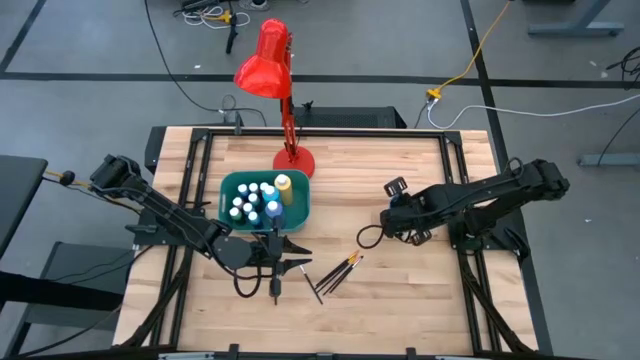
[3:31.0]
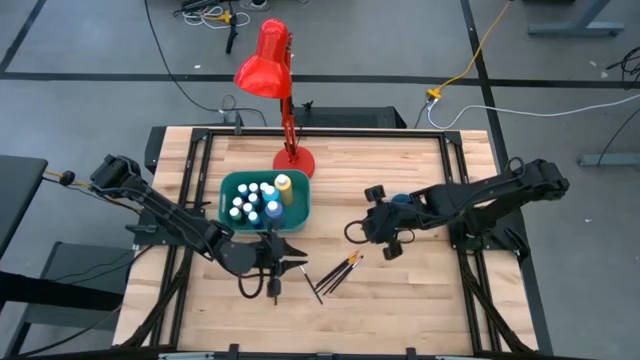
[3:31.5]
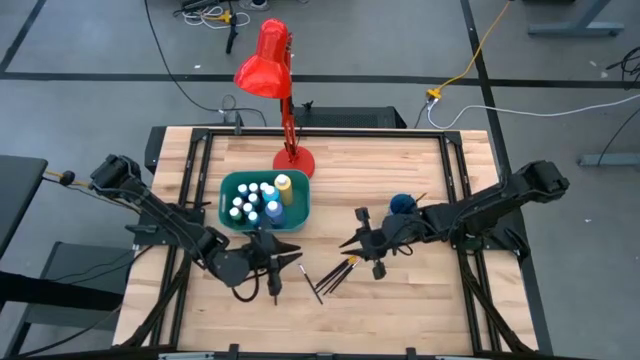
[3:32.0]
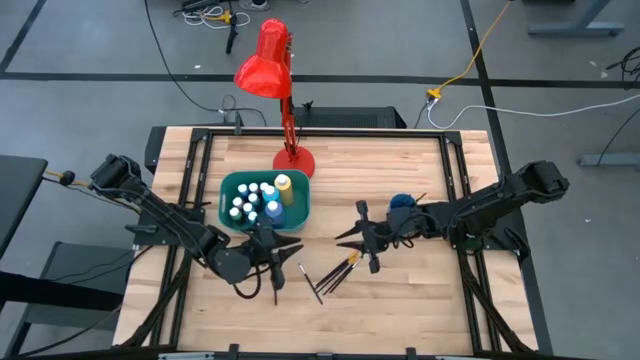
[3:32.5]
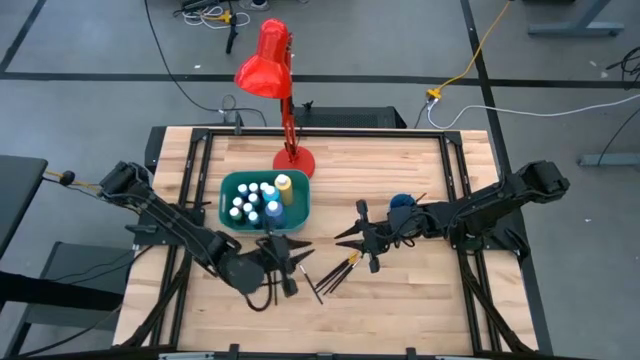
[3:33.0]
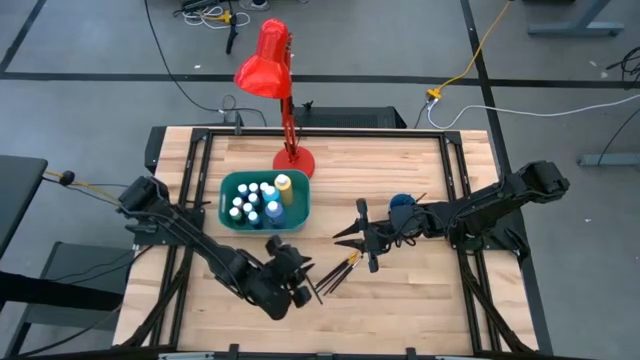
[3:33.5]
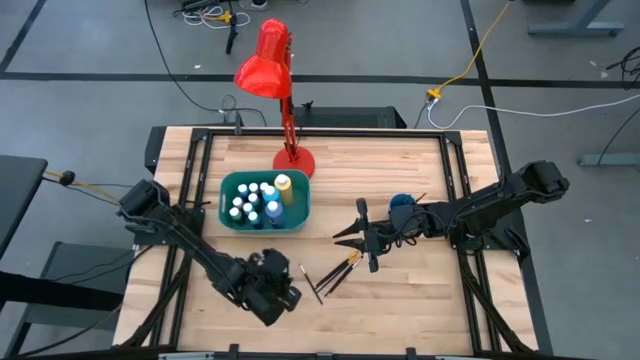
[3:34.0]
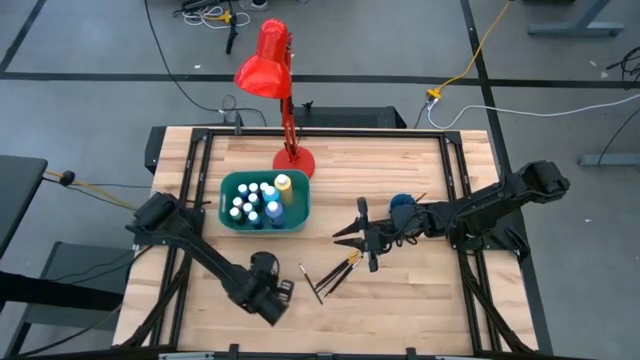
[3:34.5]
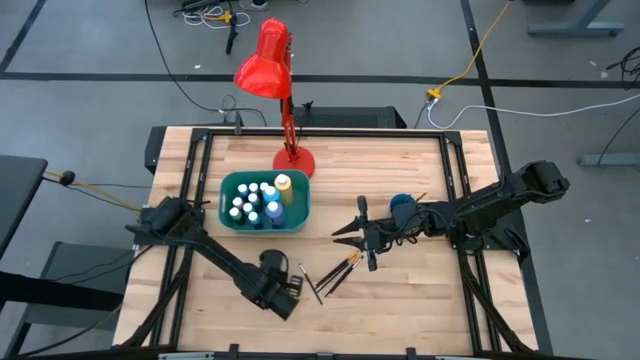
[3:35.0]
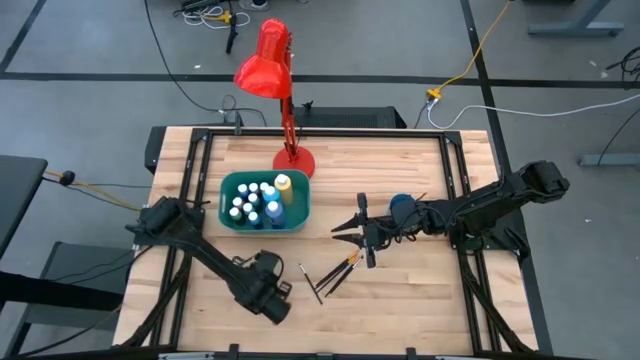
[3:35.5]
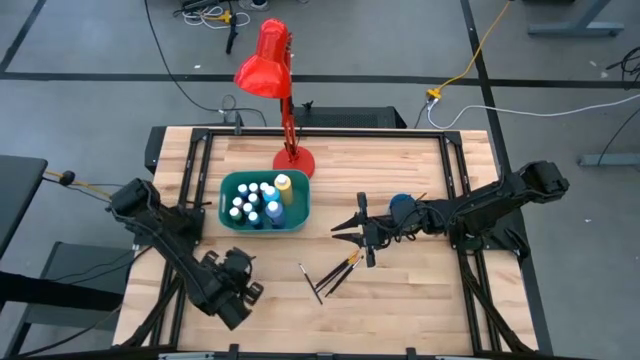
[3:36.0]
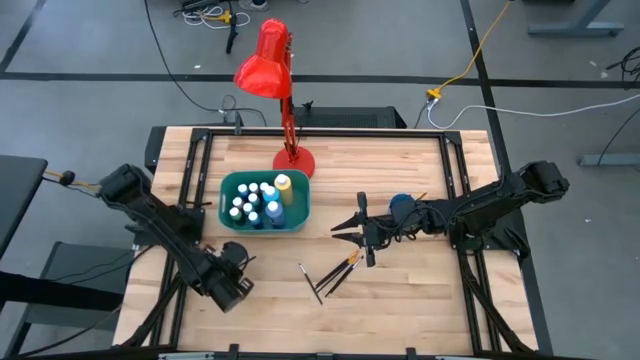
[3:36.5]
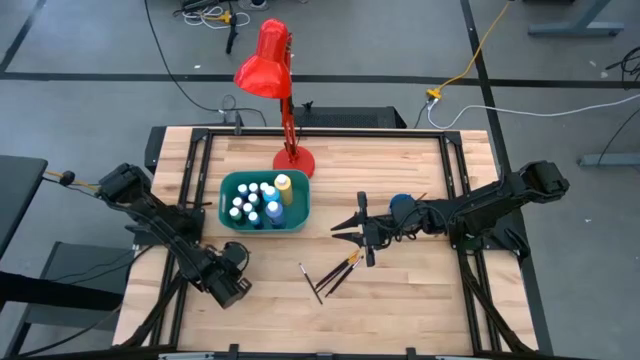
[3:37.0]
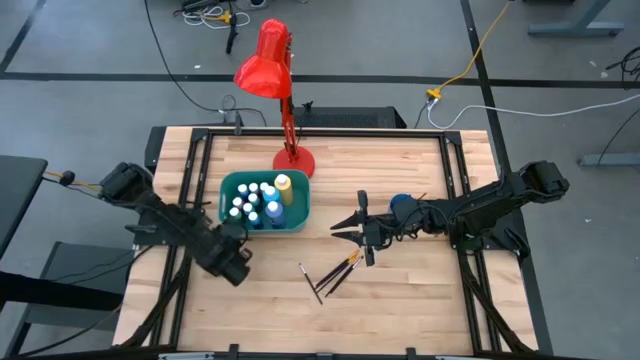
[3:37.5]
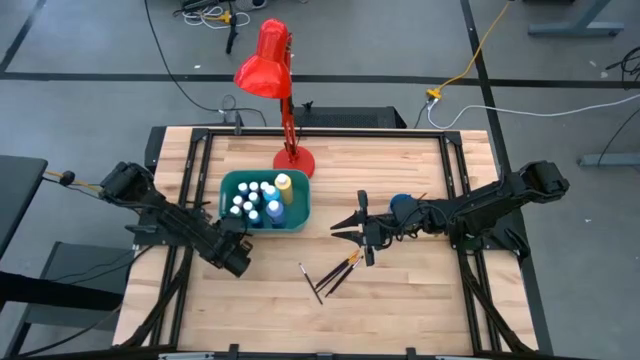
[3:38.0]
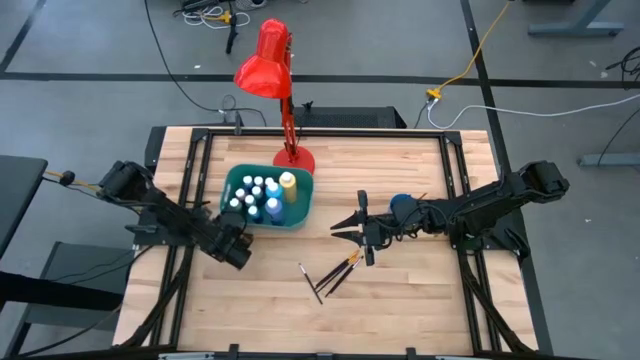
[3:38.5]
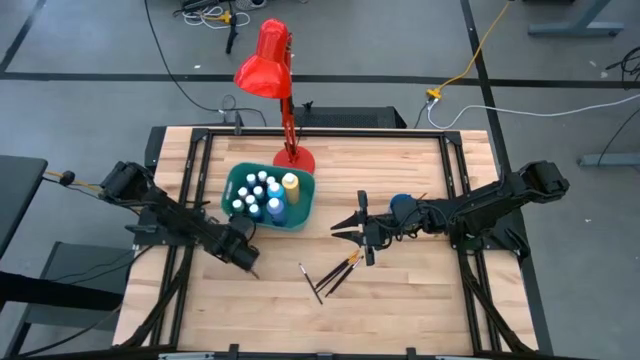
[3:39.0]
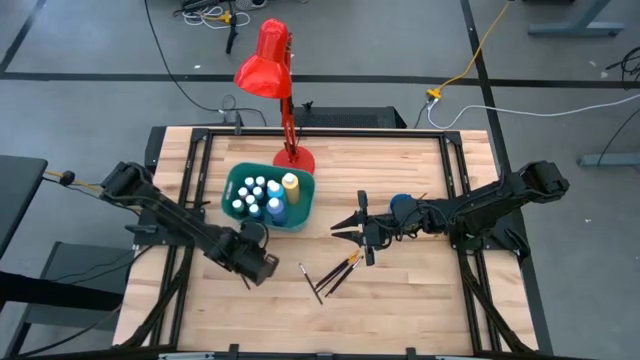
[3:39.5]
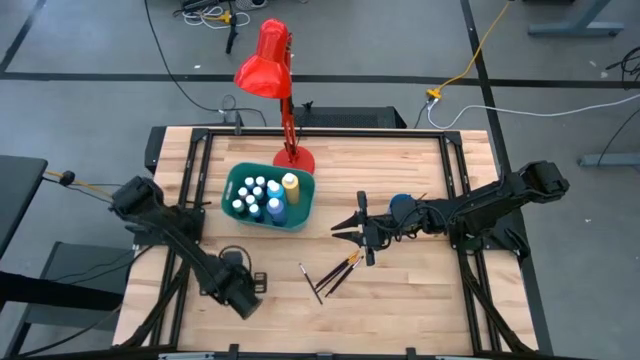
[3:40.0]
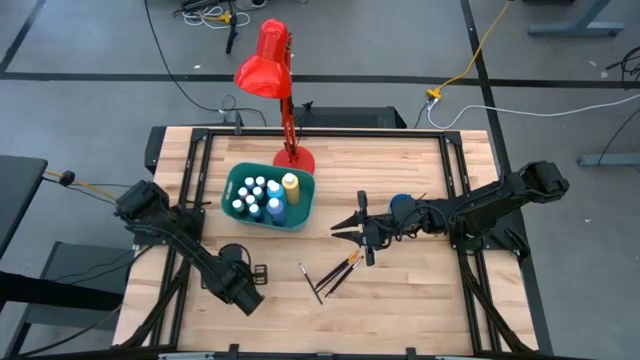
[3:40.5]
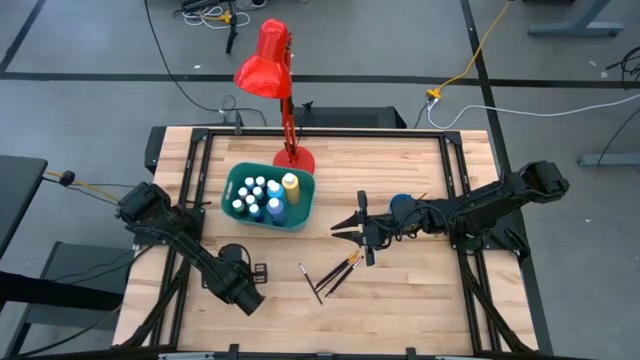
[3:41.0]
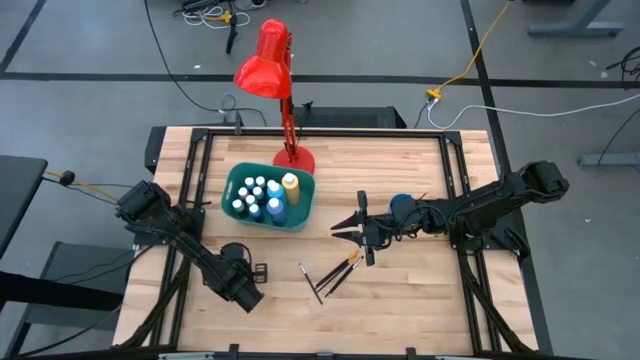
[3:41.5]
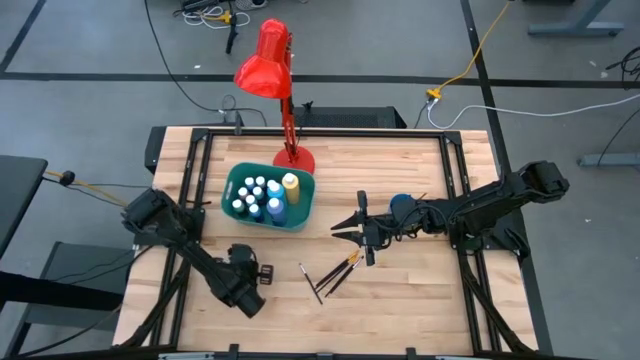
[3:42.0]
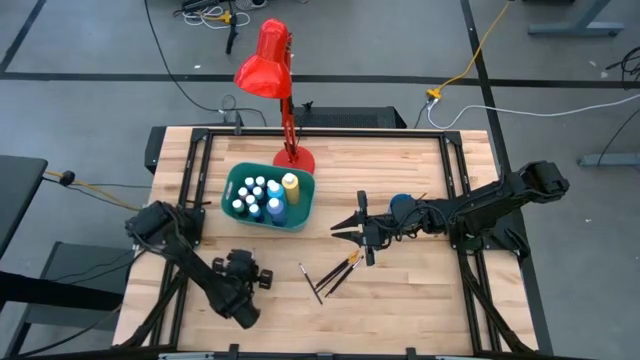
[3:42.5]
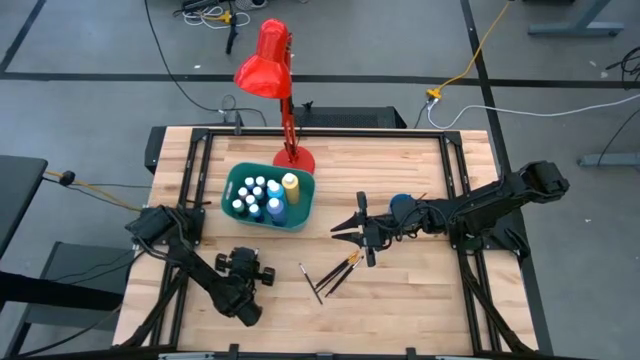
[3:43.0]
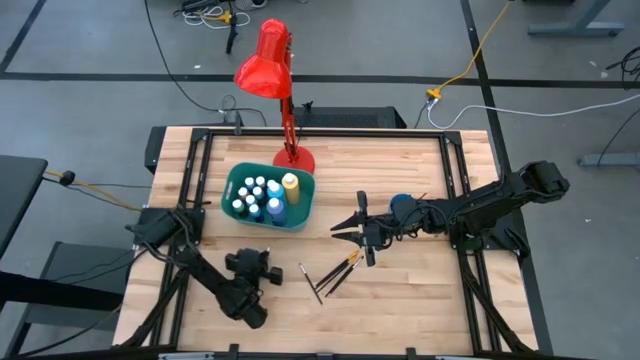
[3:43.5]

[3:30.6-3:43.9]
Task: Pick & Place Paint Supplies
Put the black silver paint brush into the blue cup

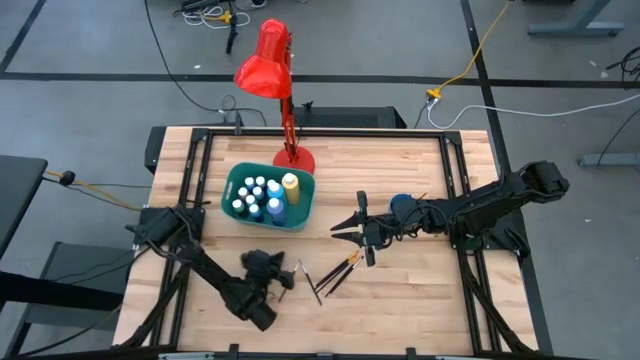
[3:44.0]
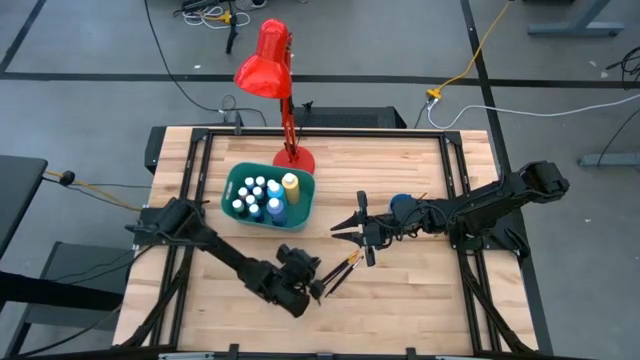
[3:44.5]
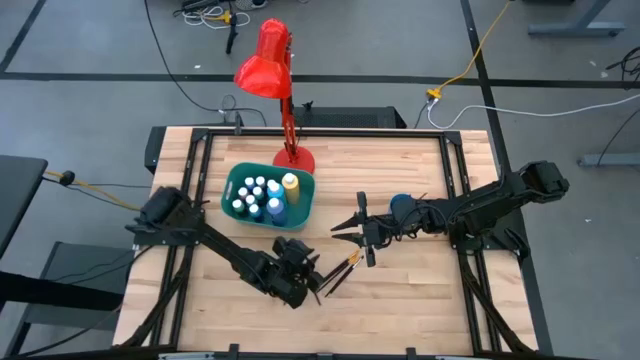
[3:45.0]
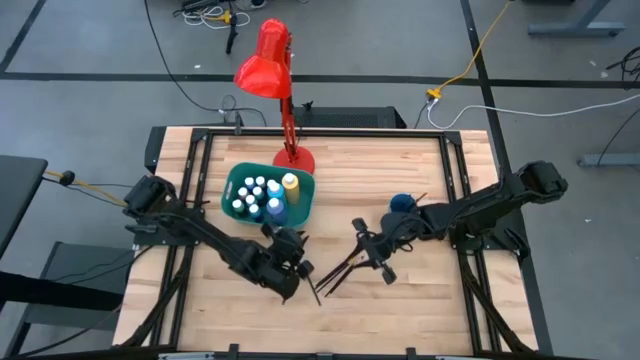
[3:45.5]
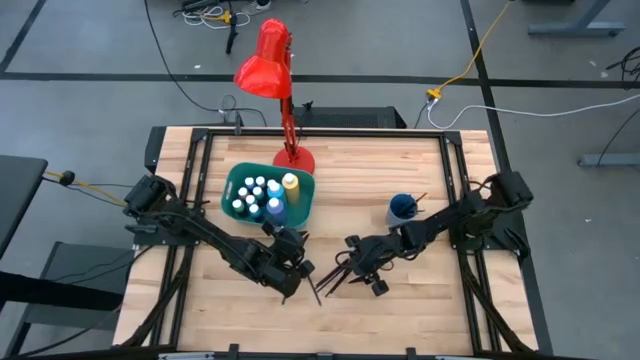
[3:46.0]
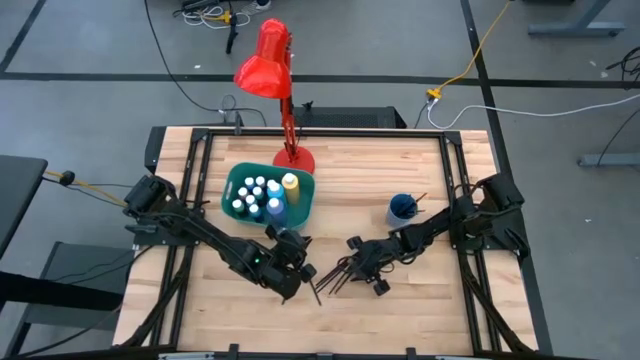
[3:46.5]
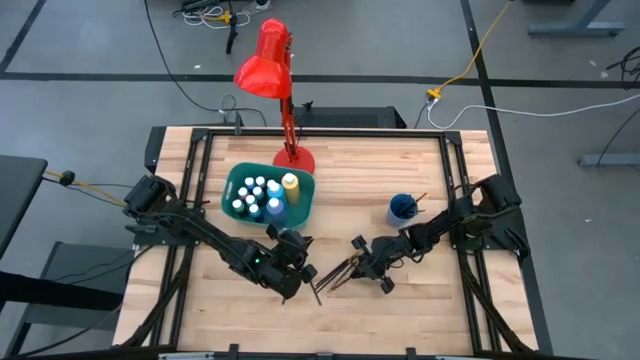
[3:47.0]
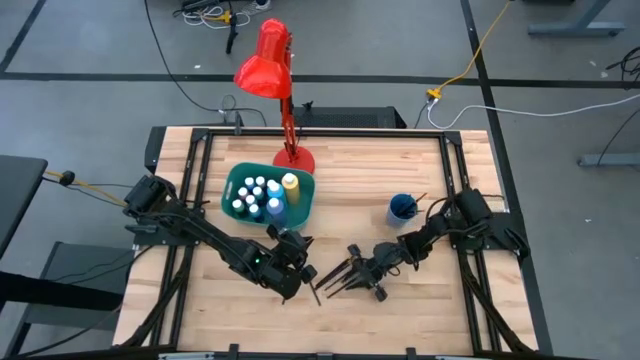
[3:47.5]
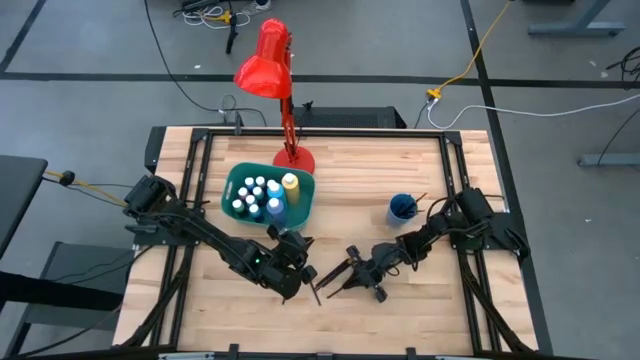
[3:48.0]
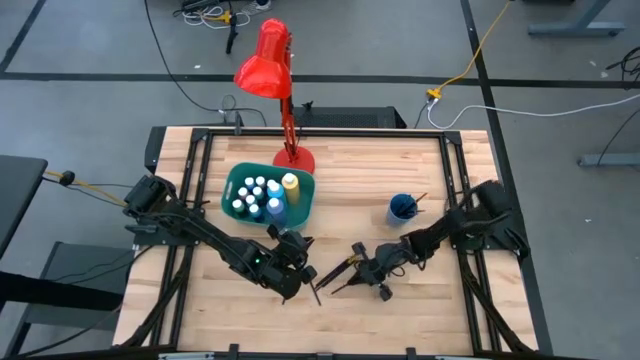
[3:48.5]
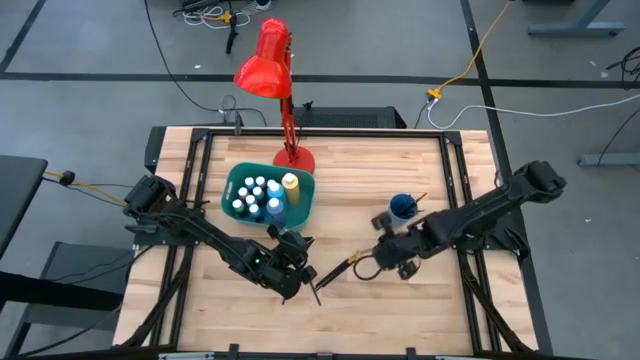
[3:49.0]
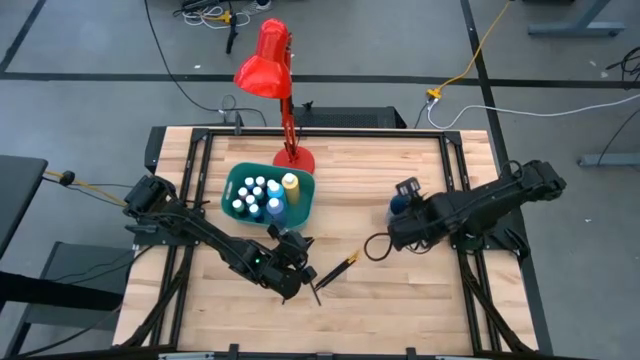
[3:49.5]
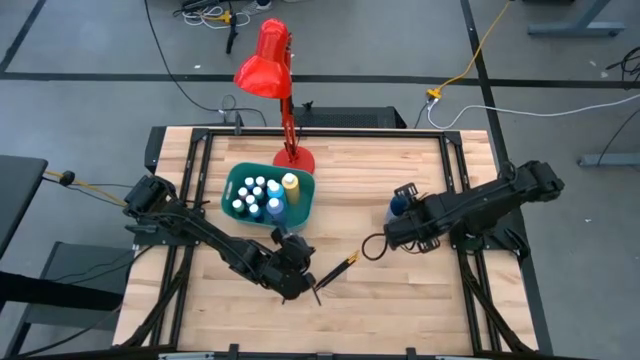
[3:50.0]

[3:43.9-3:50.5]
Put the black silver paint brush into the blue cup

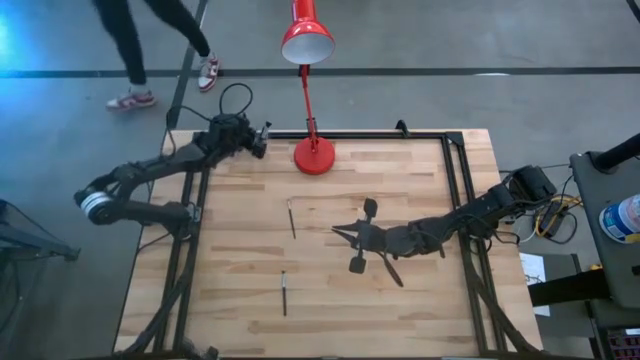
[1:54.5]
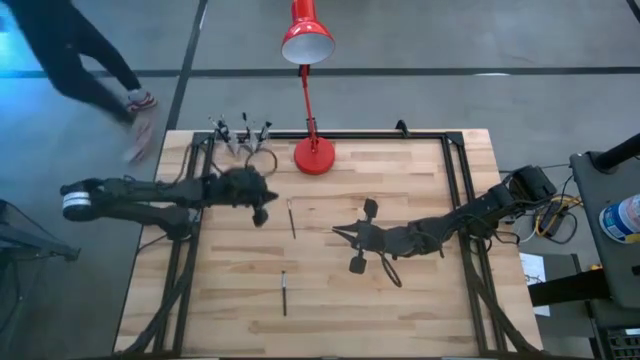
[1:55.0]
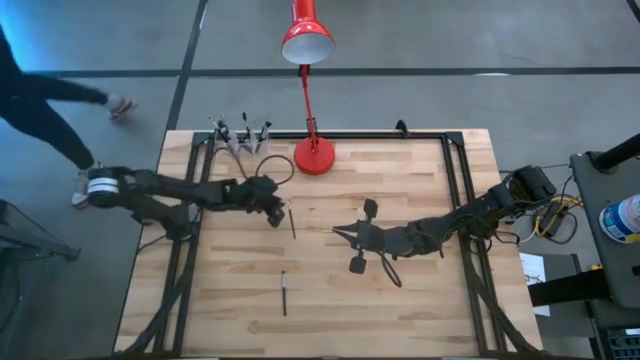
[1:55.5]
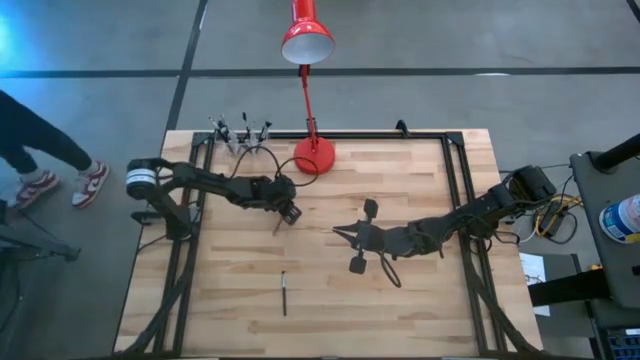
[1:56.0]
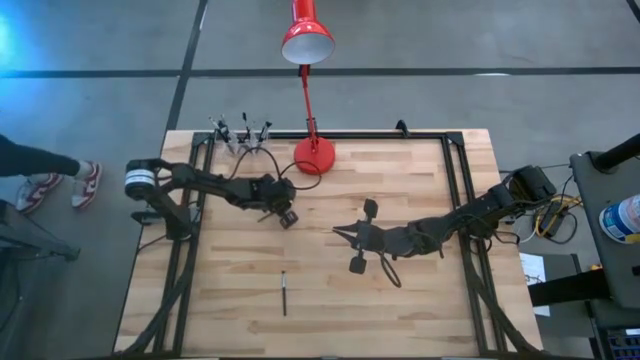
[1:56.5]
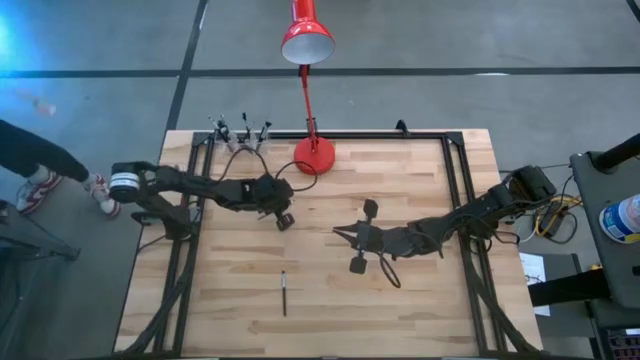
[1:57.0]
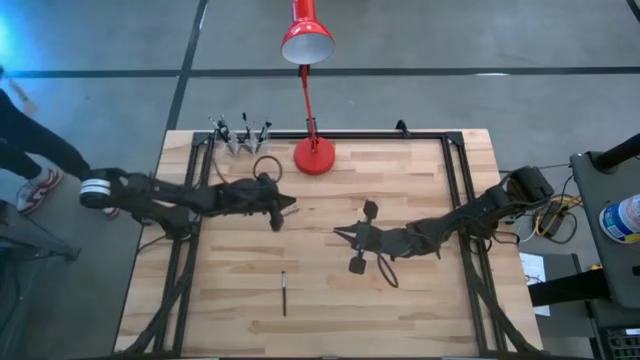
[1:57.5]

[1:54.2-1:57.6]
Task: Pick & Place Makeup Supplies
Put the makeup brush into the transparent organizer
